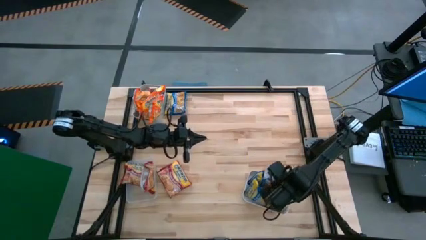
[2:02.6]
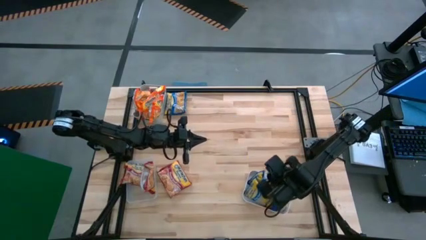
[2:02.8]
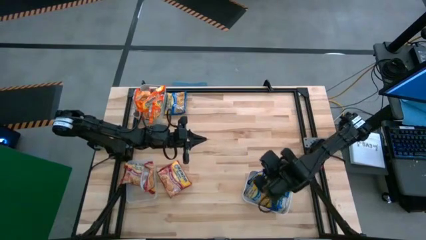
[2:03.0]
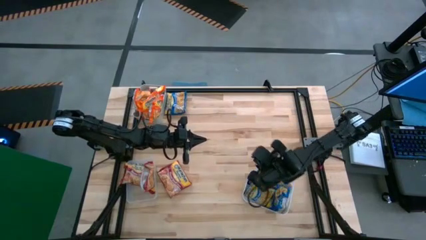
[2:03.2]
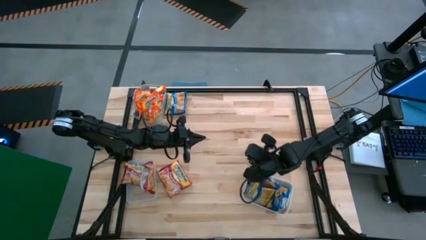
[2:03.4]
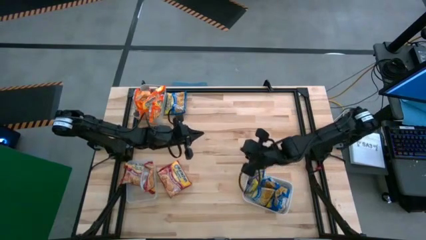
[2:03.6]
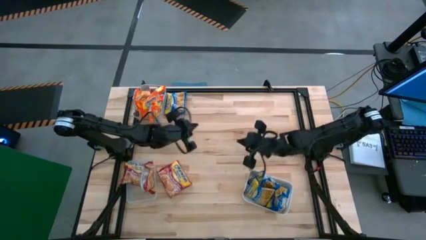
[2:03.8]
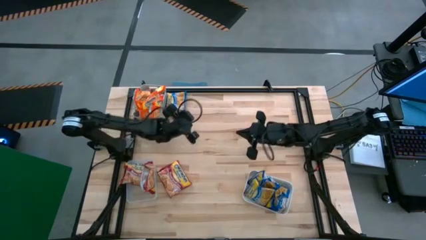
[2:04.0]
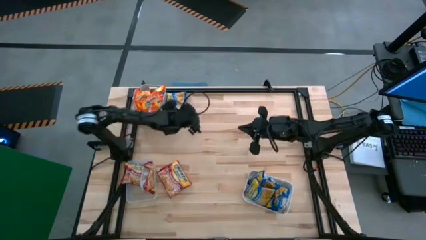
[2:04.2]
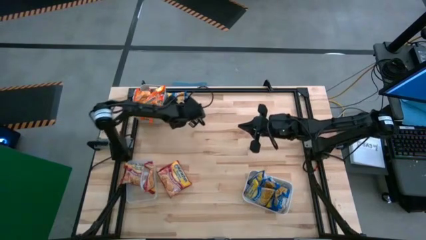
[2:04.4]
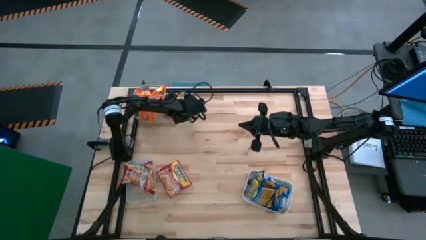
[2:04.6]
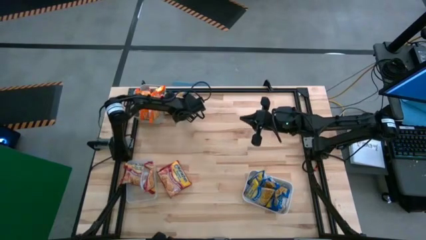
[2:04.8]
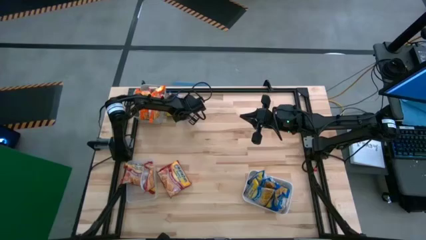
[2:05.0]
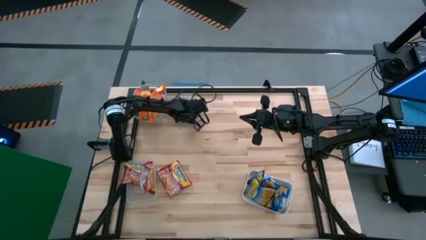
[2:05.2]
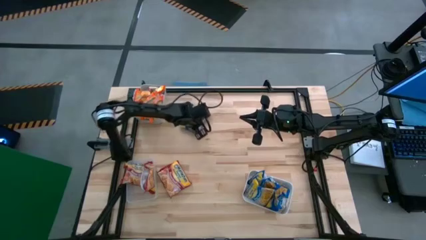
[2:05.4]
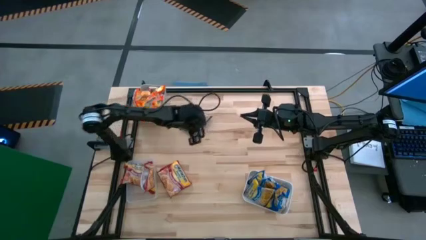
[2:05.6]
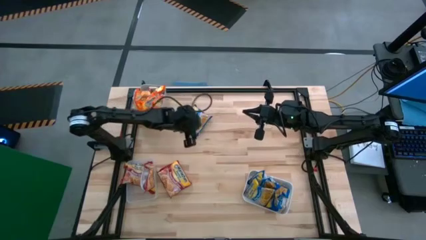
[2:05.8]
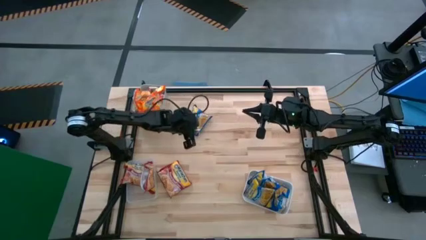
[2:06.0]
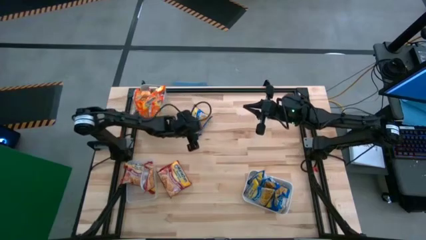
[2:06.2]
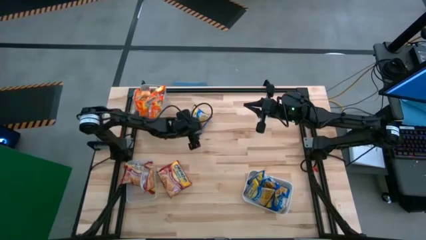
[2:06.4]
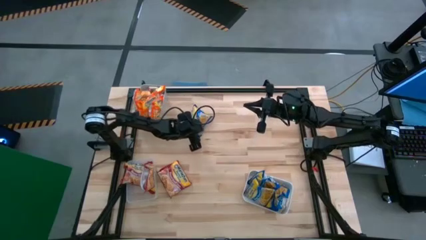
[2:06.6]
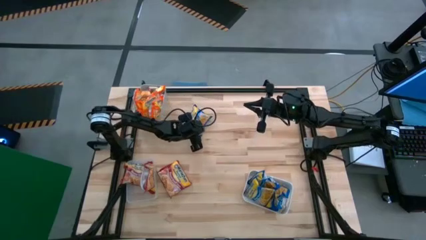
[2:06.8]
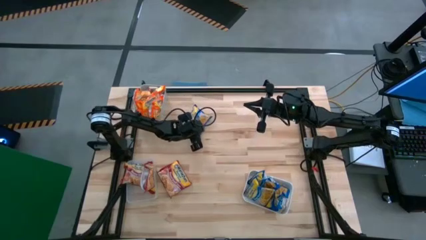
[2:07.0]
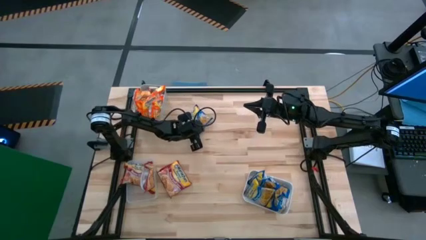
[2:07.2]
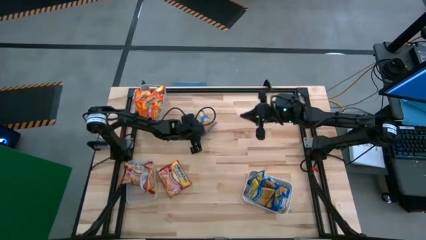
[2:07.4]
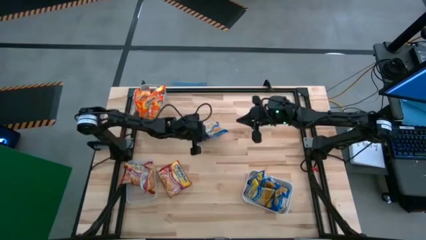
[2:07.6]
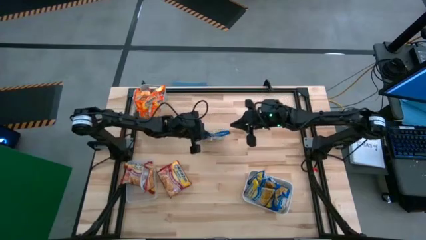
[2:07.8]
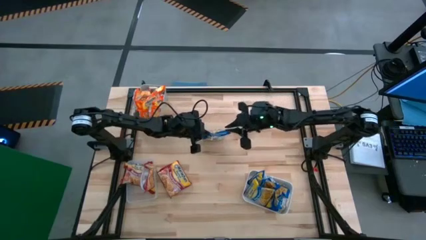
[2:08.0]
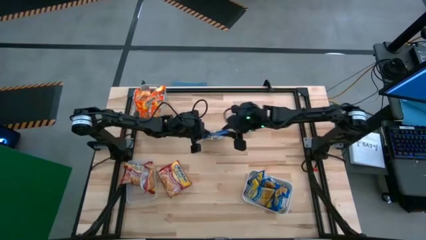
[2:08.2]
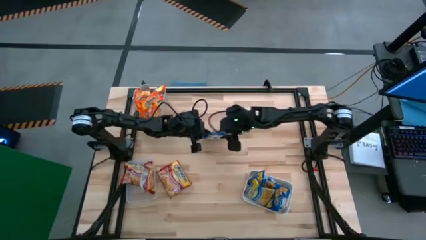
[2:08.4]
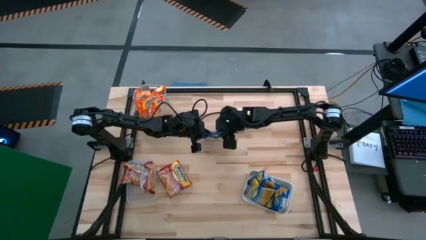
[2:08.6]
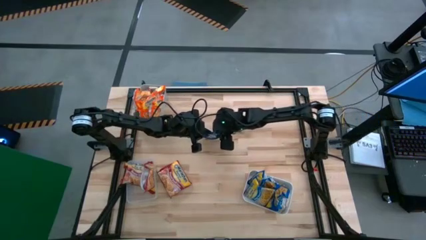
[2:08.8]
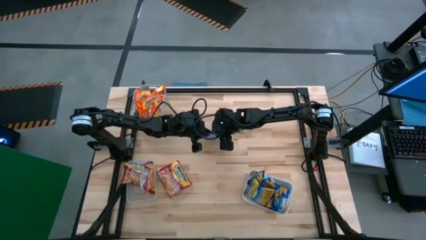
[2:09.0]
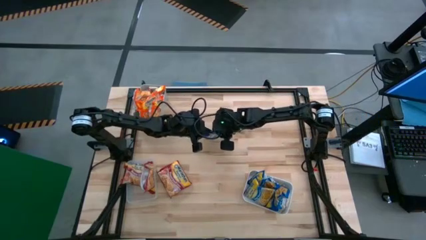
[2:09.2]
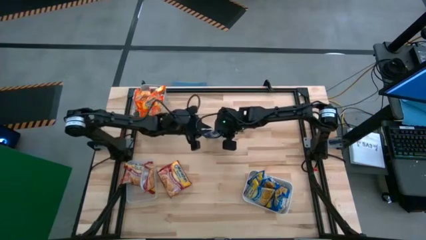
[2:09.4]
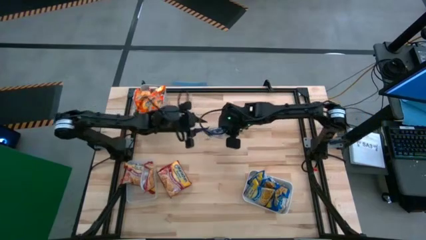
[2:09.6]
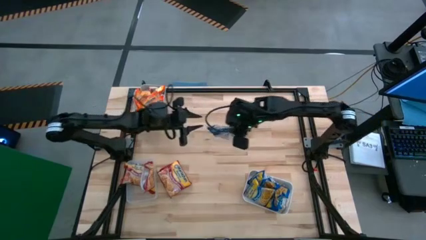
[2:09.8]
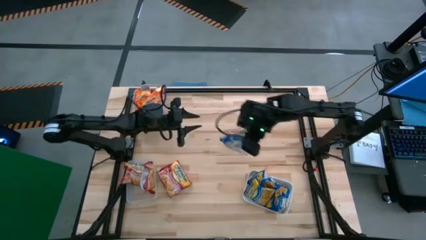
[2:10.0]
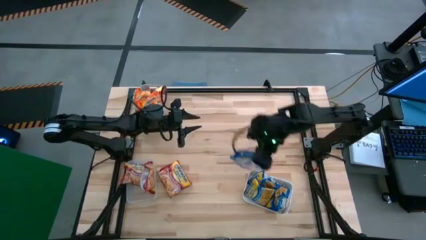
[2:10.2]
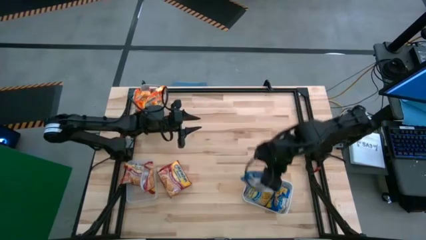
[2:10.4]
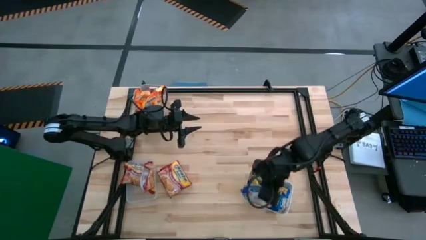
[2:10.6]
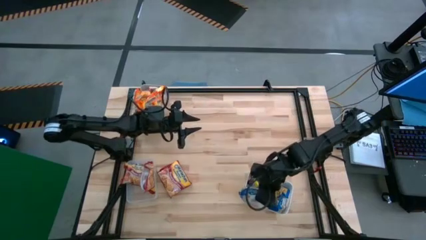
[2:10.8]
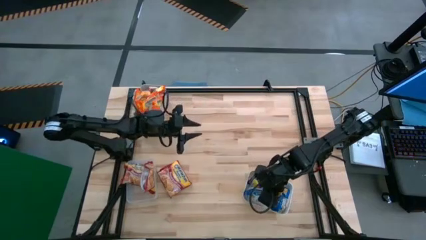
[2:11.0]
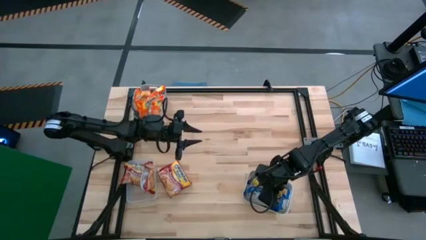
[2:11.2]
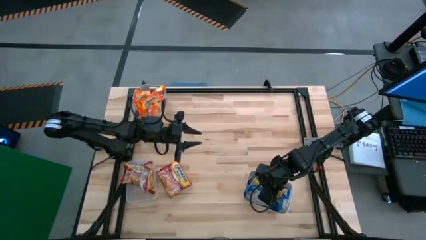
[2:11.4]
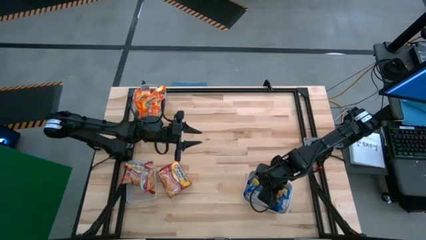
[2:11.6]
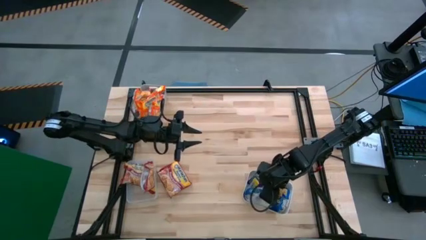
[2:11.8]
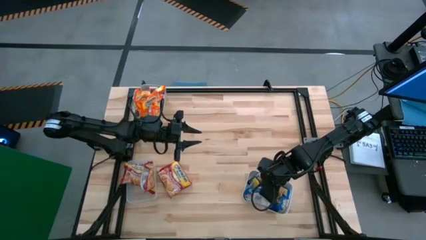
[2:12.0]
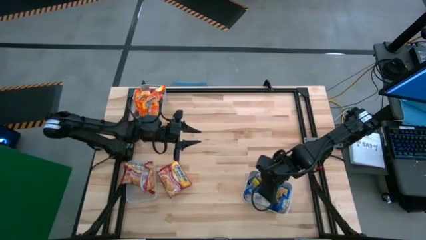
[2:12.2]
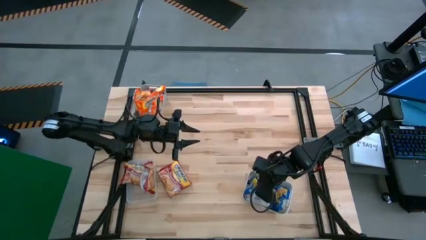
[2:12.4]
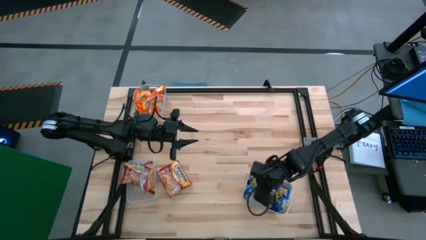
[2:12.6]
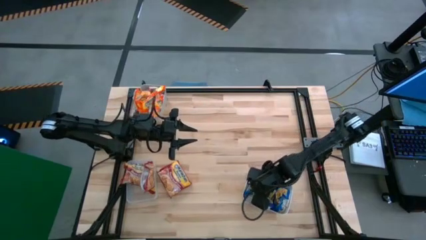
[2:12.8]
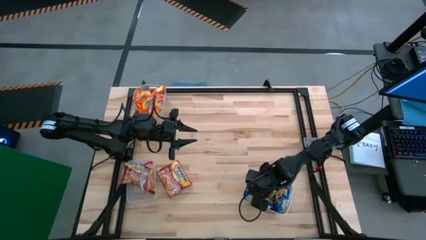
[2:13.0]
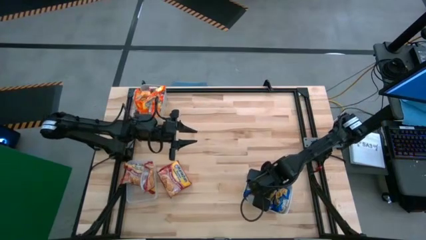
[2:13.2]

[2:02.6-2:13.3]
Task: Sort Maruchan noodles
Put the blue noodle pack into the white bin

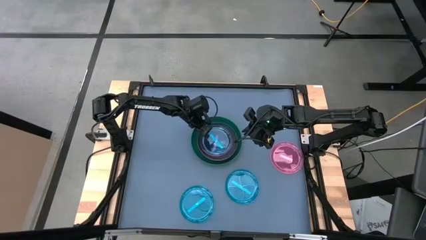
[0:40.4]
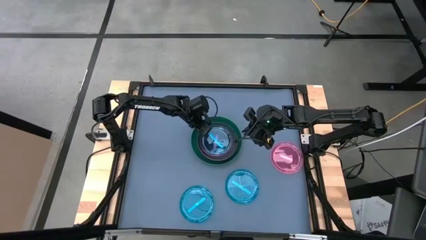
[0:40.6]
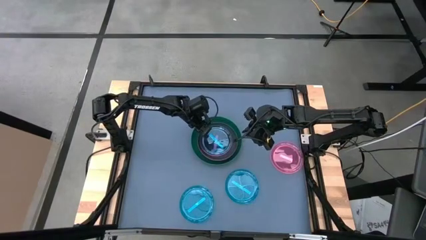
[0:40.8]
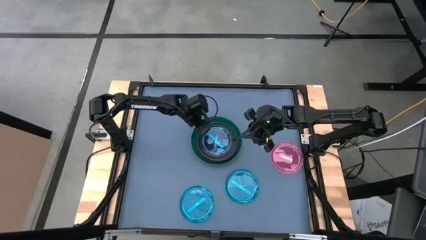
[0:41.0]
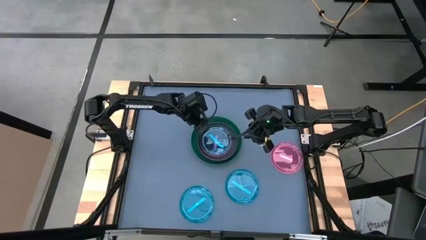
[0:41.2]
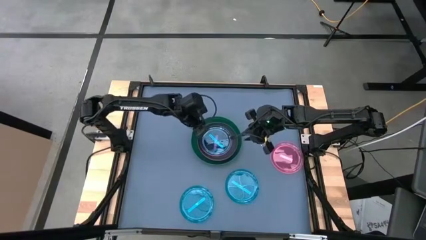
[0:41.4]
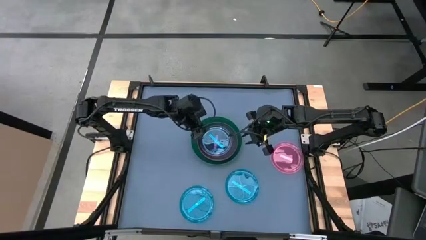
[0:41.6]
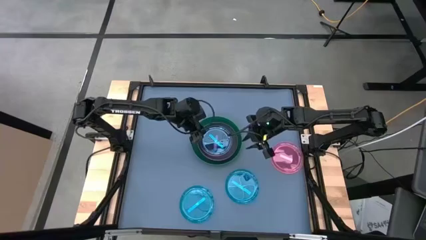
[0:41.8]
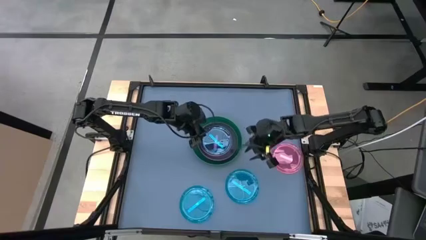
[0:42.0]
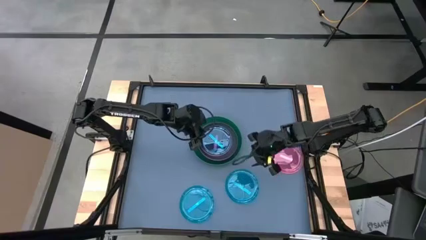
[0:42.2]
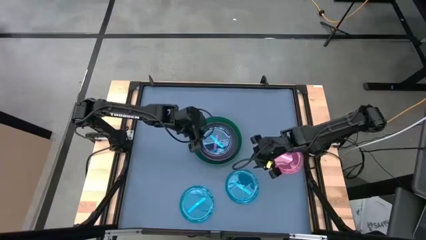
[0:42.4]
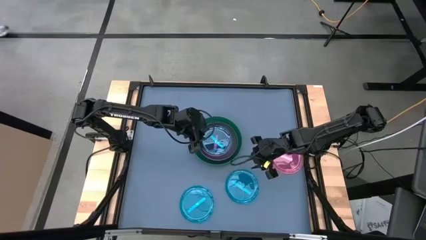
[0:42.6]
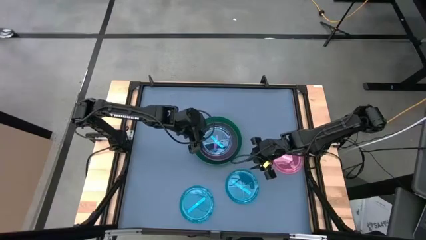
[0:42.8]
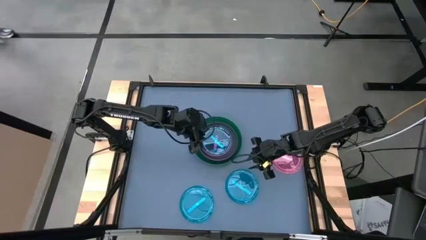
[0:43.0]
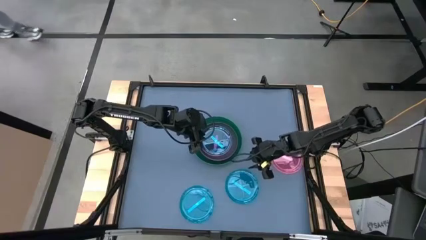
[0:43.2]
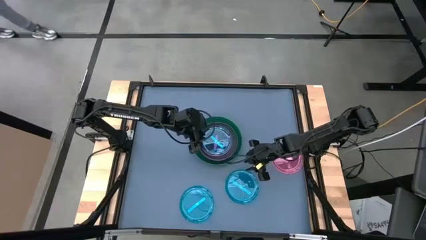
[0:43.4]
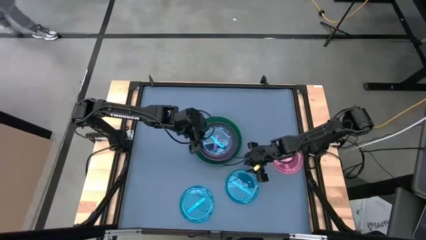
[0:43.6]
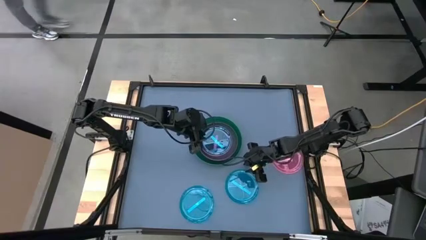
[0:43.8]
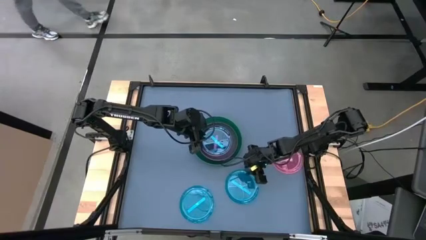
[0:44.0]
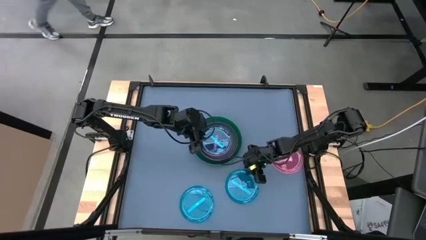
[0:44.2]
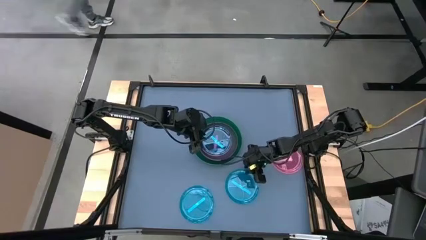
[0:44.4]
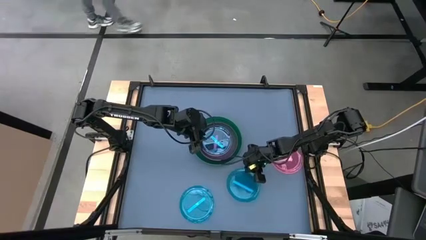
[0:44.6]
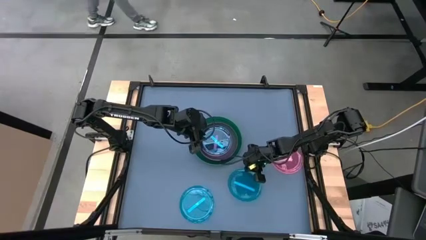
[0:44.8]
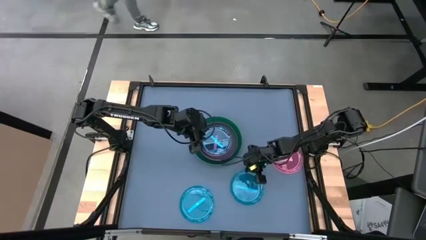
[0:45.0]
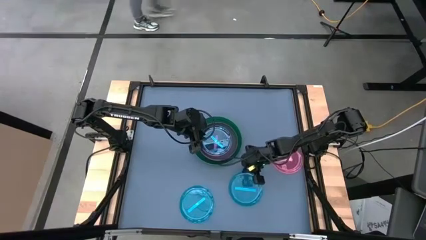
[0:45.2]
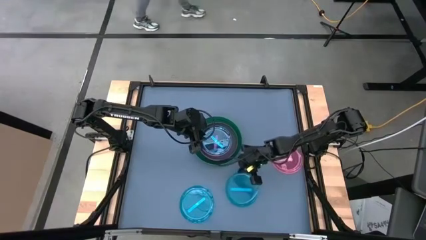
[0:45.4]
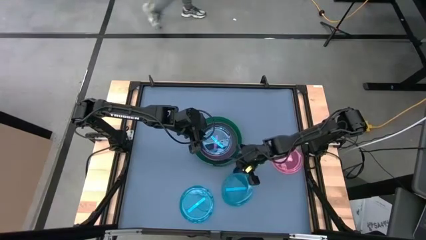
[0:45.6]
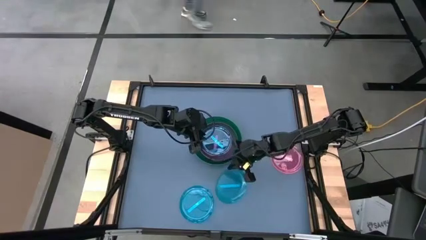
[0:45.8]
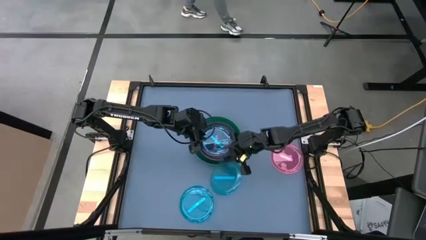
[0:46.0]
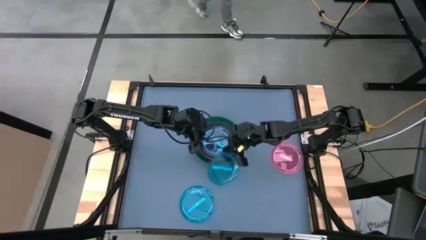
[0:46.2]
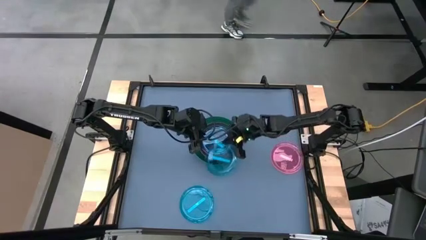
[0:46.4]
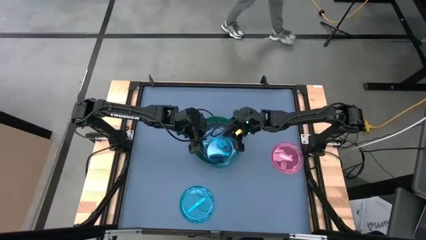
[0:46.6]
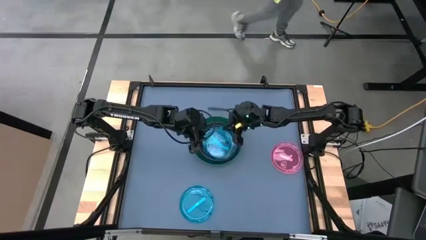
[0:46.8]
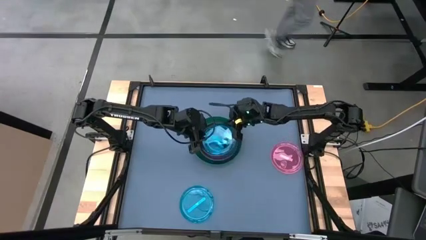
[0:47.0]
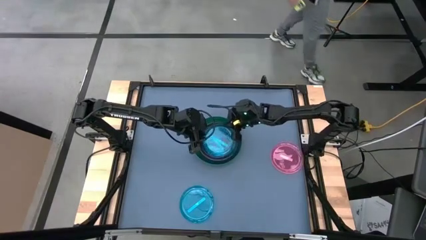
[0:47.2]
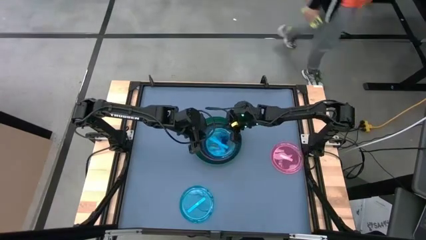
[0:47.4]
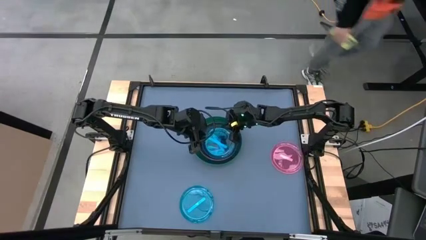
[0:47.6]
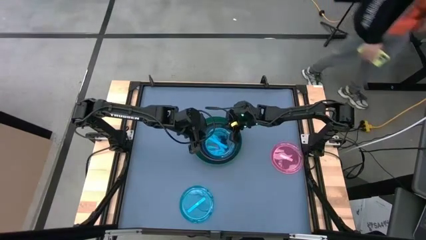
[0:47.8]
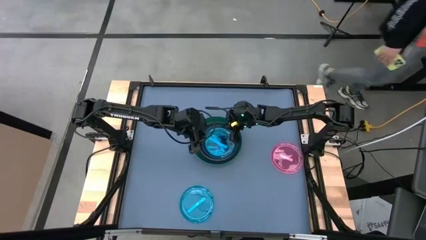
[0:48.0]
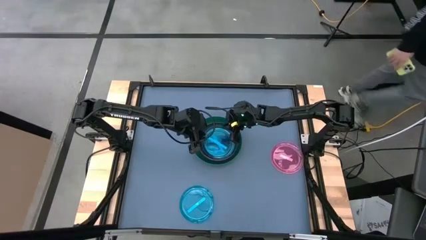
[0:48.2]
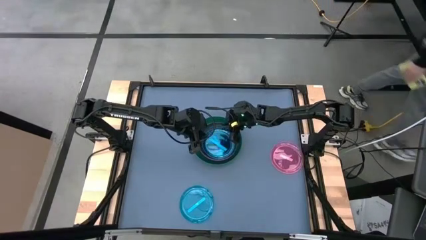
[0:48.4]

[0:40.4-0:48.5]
Task: Stack plastic plates
Stack the bottom right blue plate on top of the top blue plate
